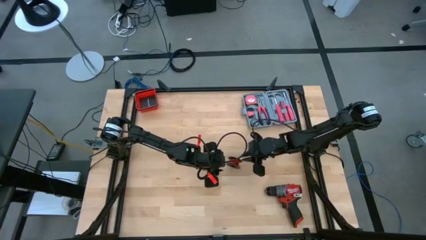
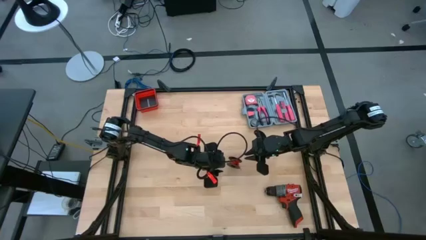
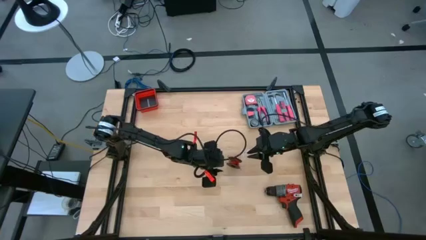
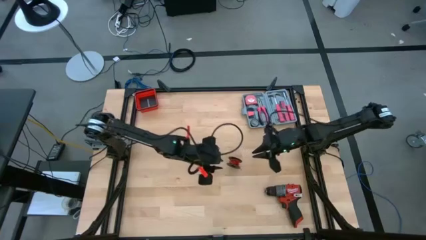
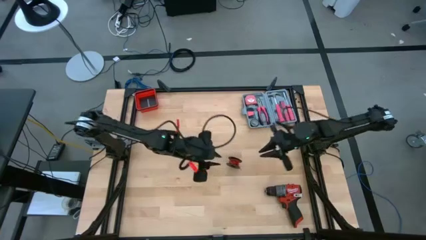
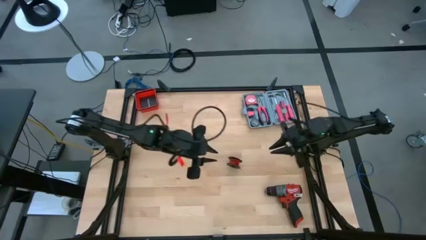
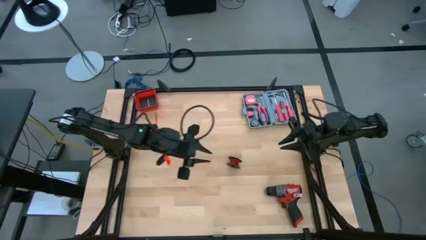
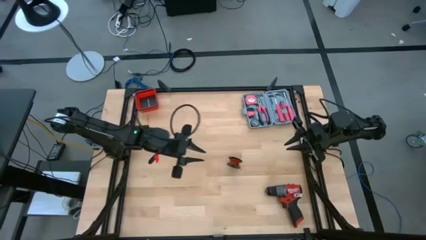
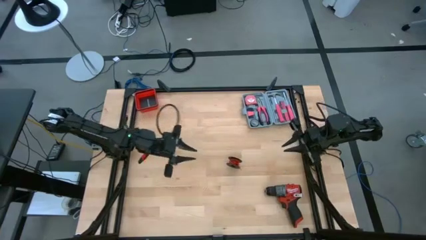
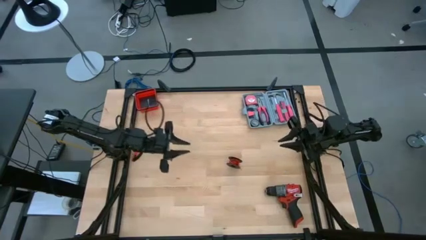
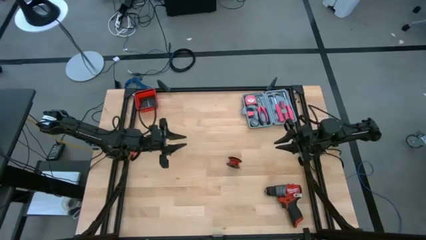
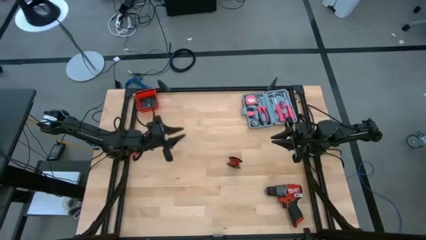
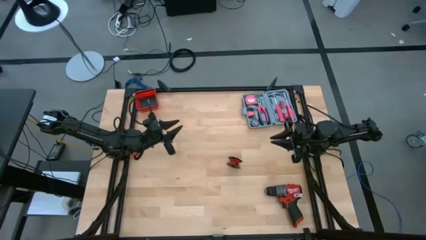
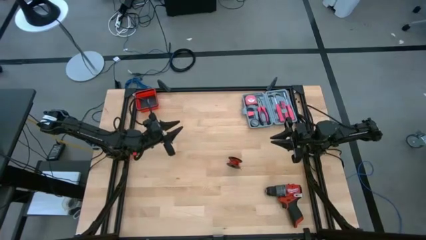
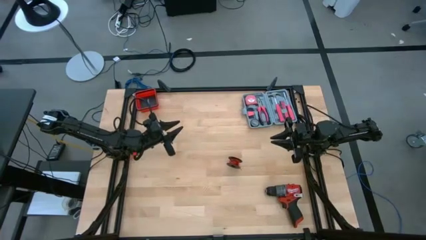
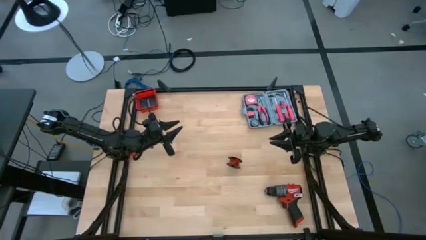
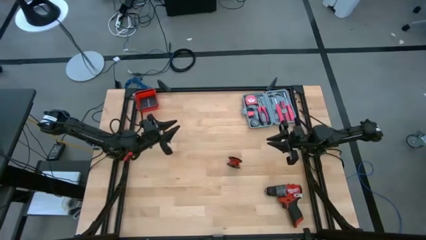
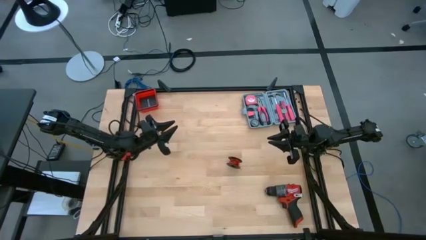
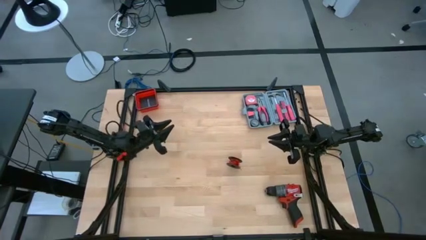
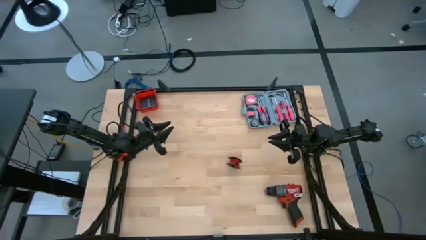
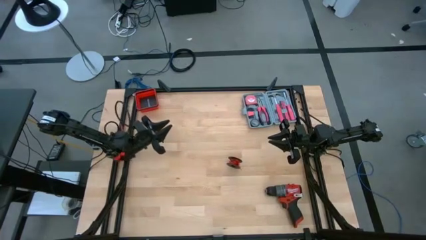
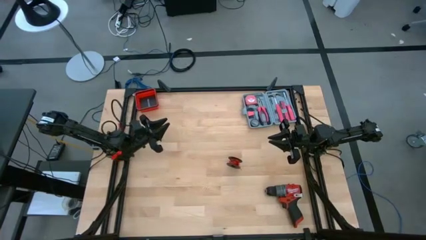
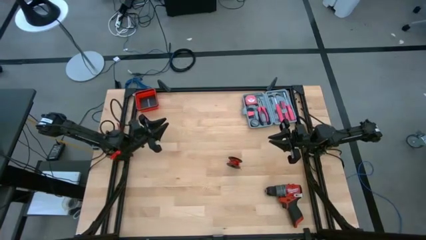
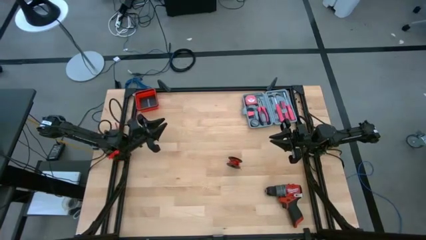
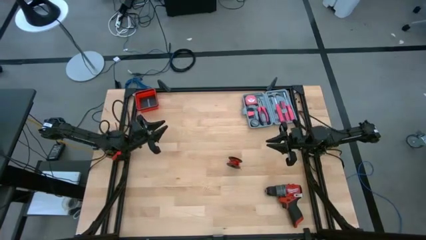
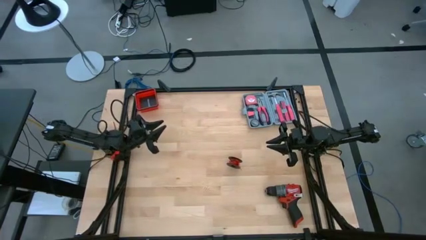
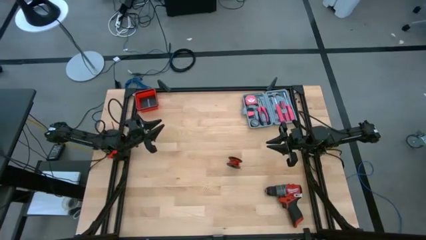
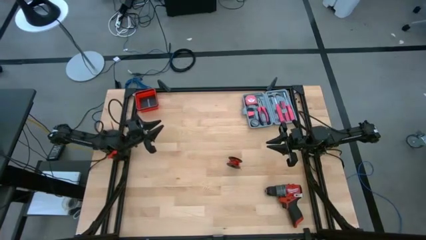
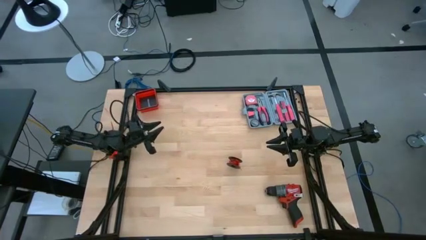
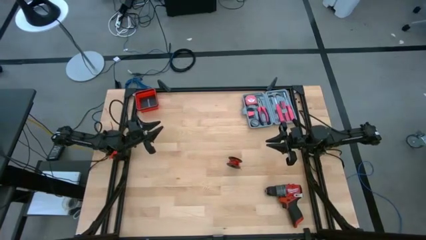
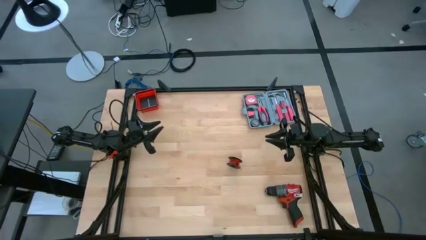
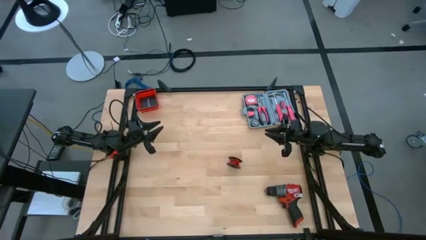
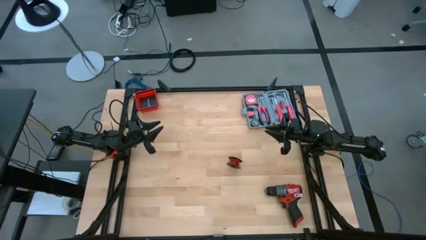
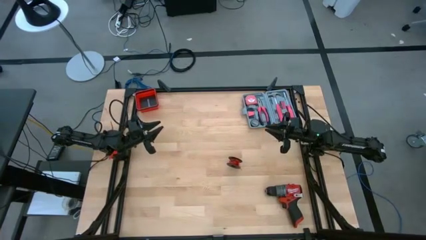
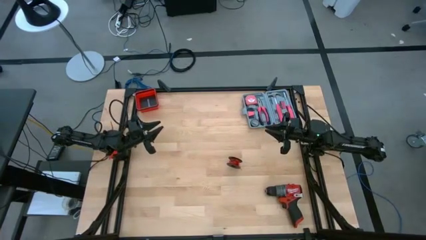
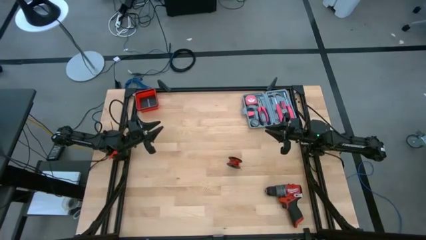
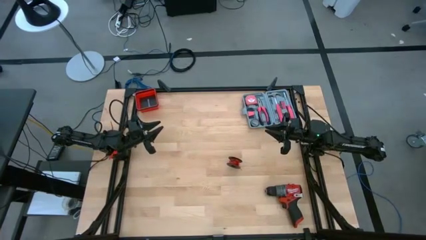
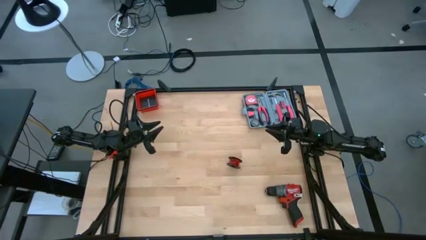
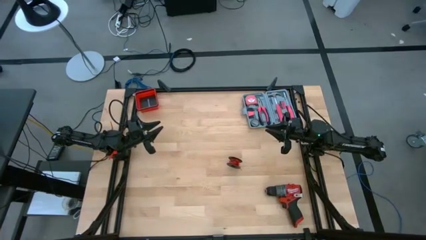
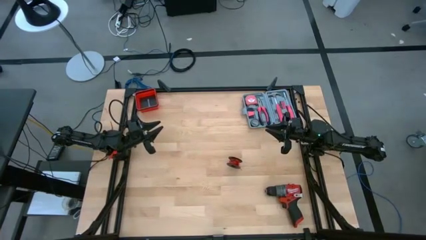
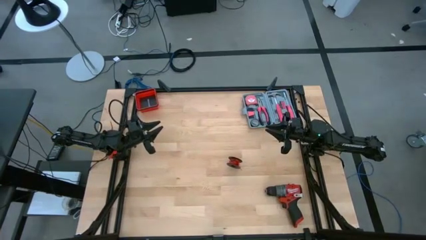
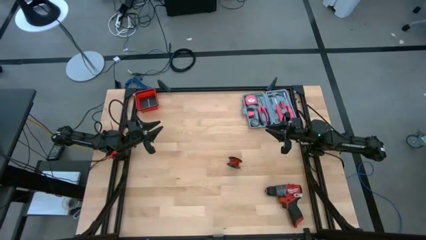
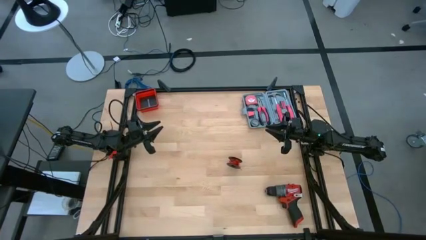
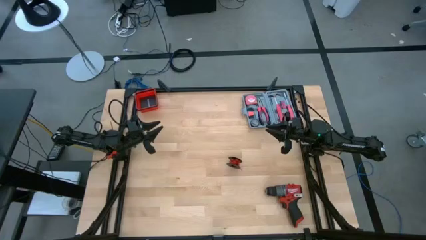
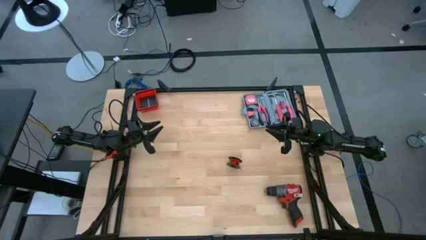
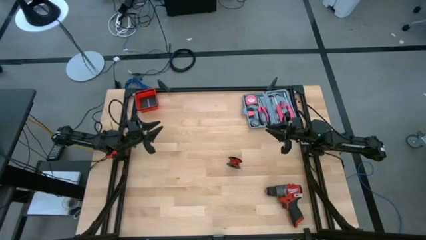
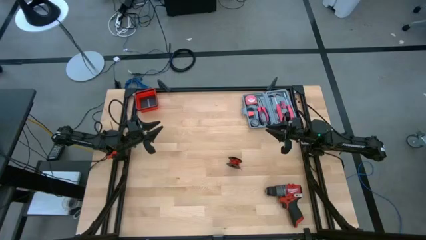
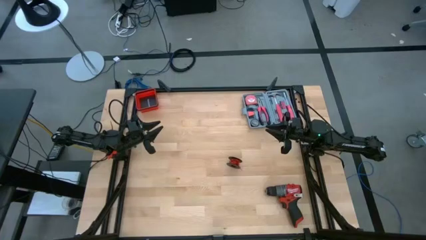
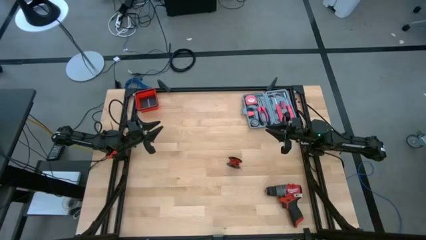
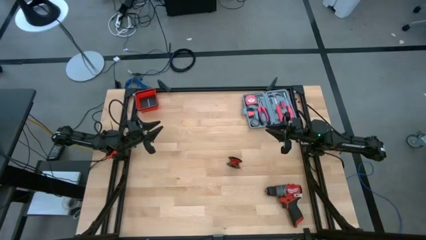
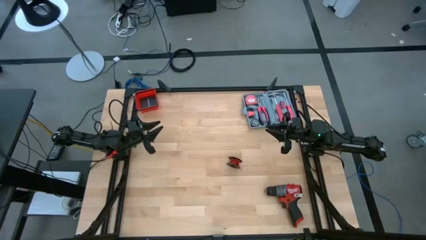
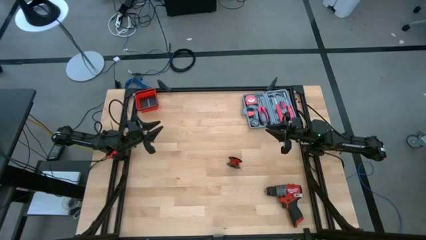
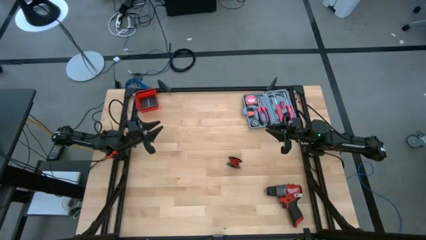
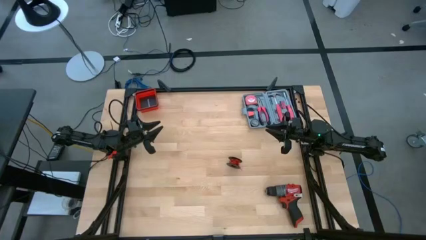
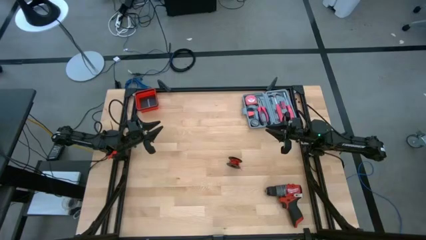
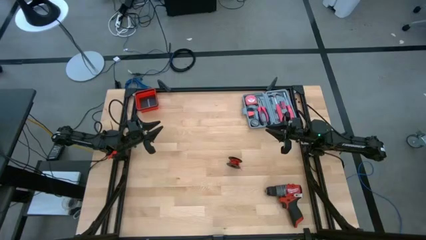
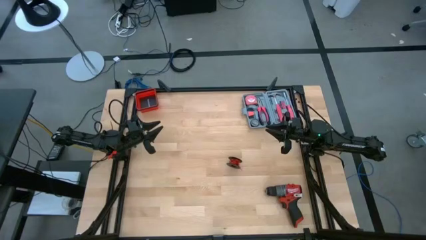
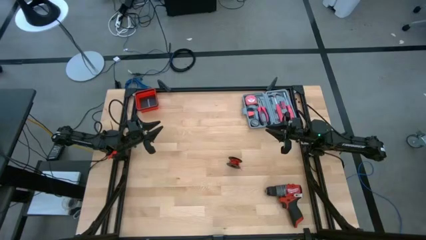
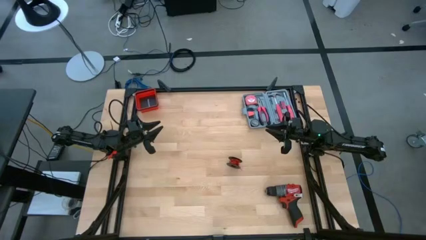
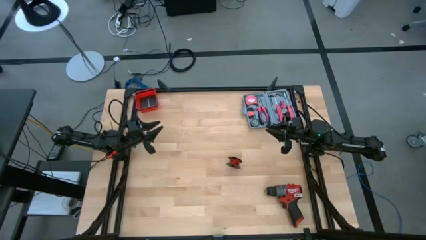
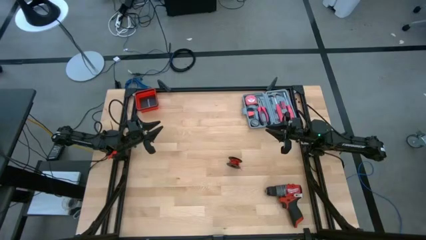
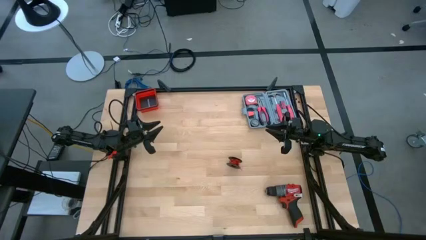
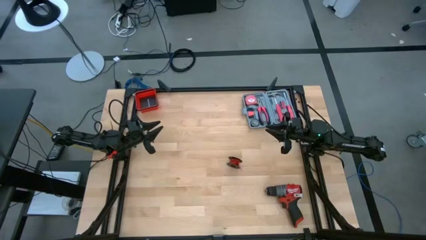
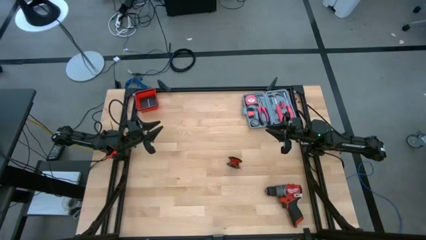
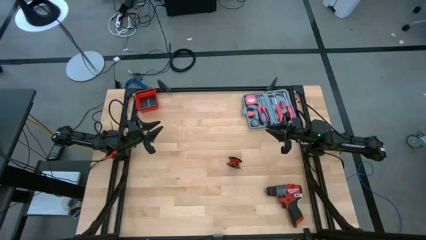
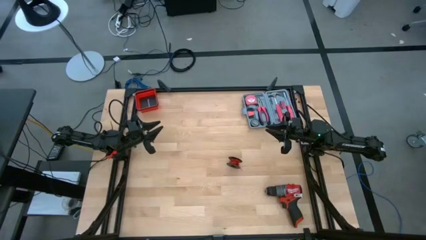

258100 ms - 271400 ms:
Task: Coil cords
Return to Home Position

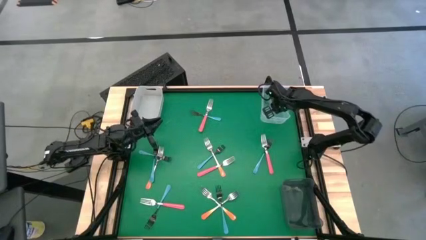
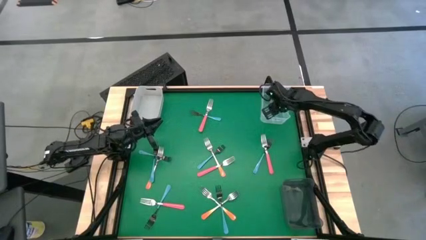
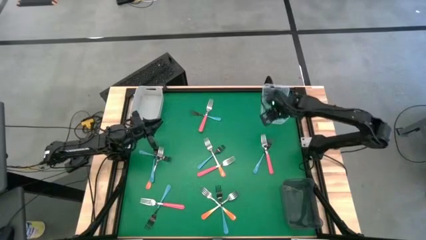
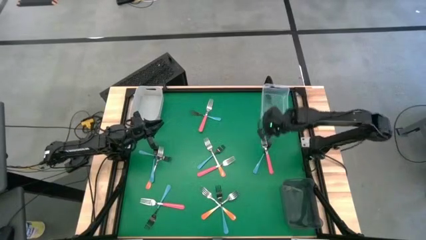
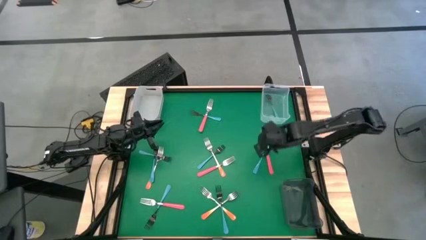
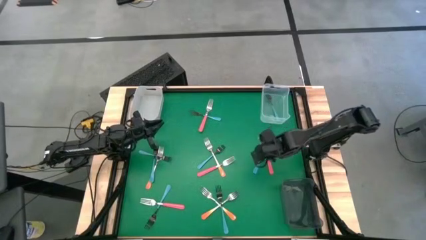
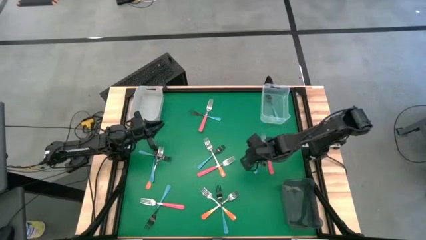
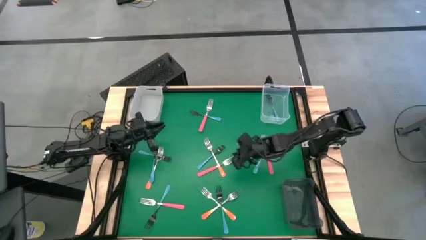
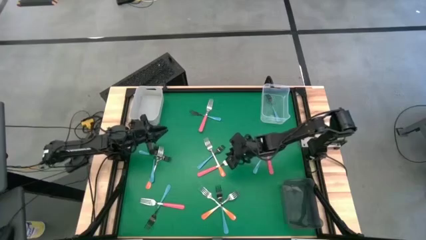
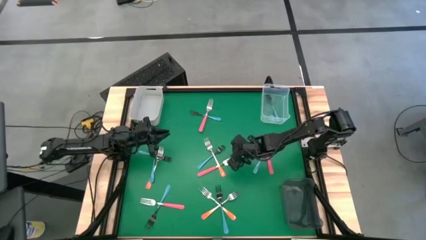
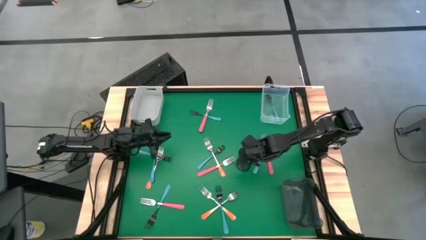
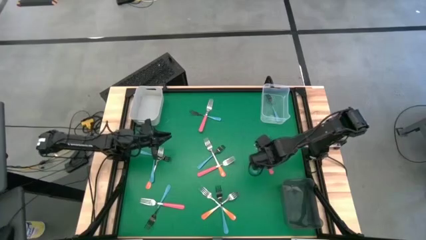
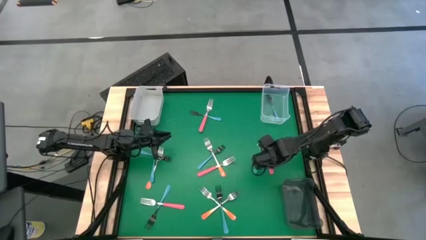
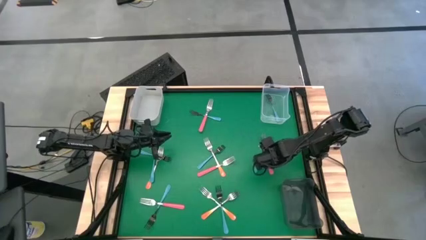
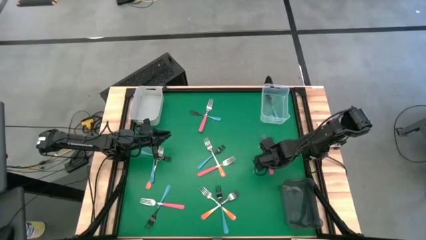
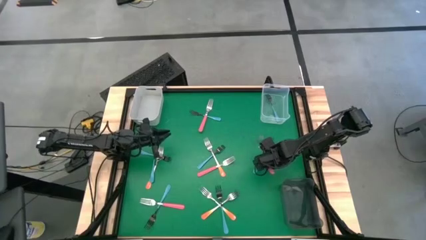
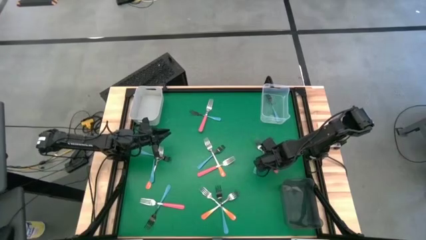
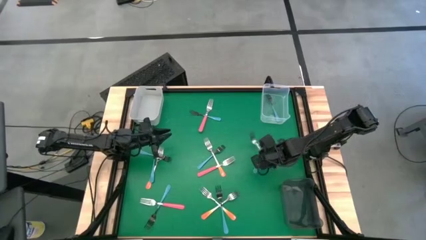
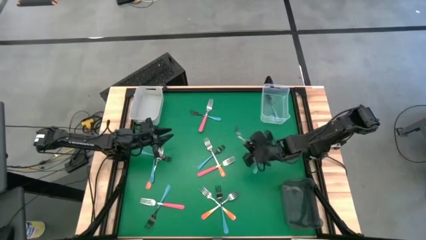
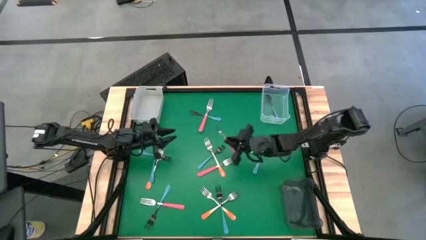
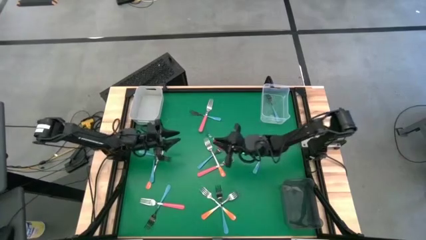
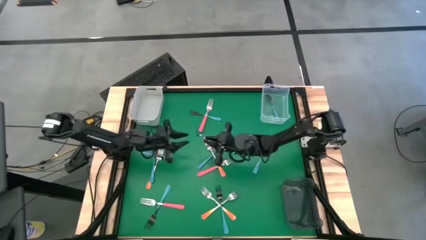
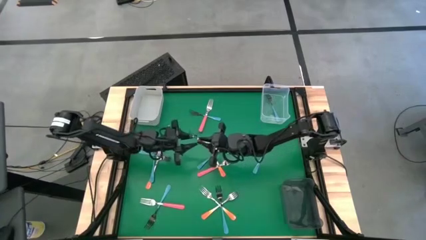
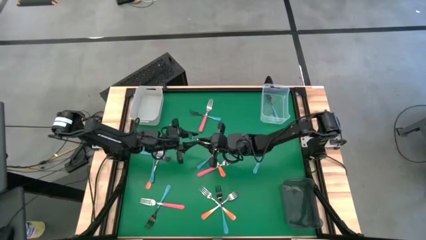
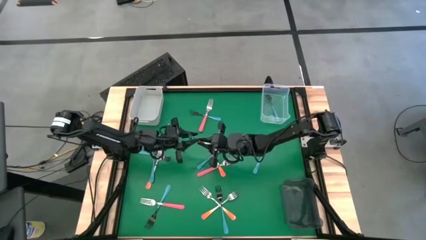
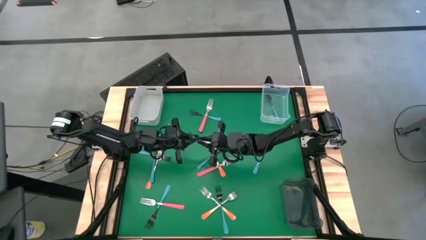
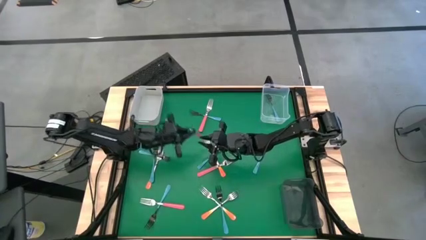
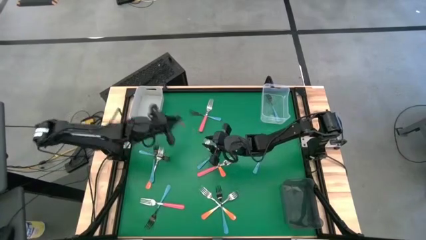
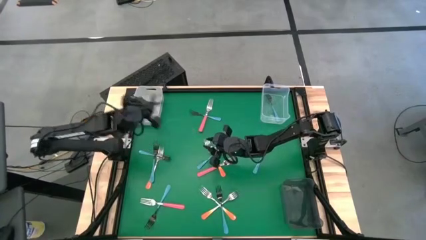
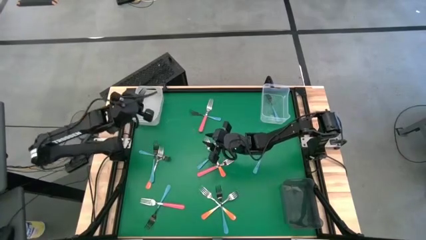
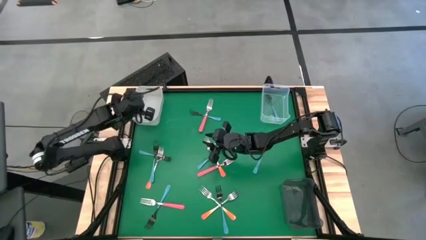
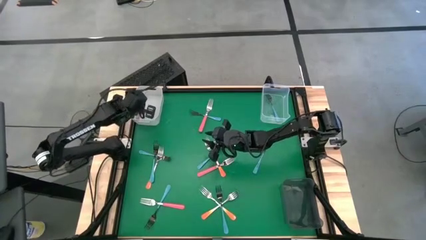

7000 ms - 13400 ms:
Task: Sort silverware by color (type)
Put the pink fork into the white bin
